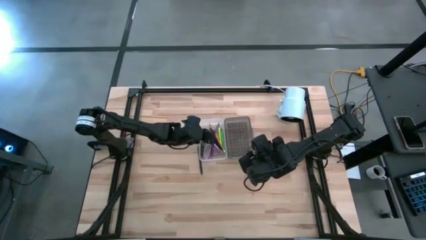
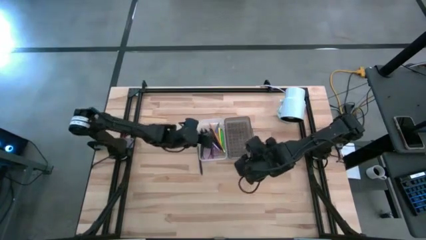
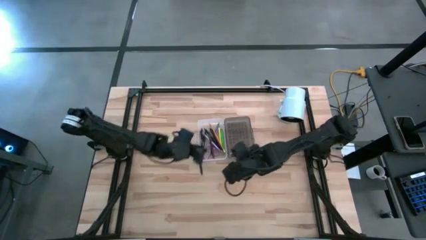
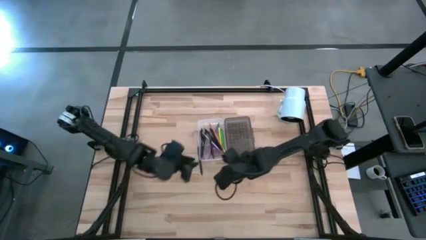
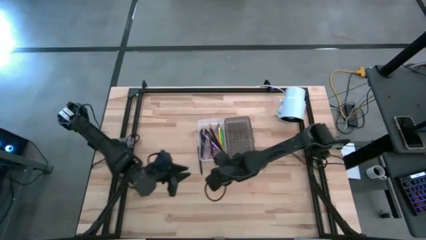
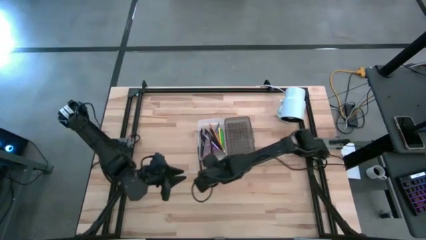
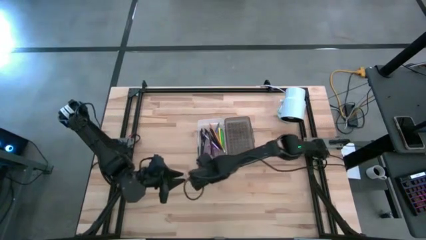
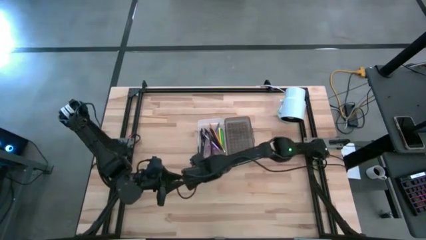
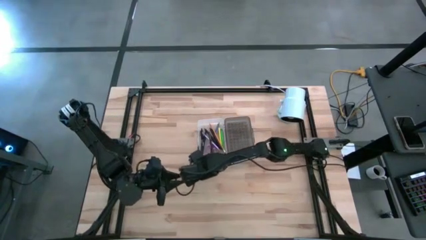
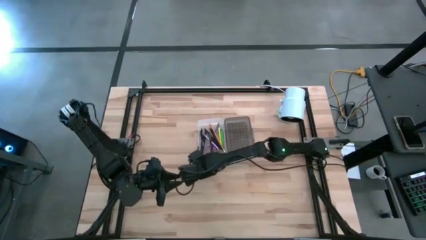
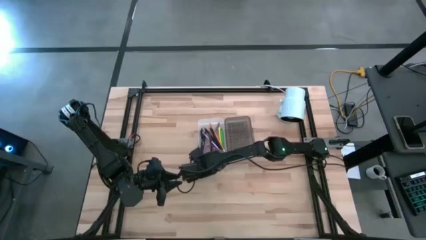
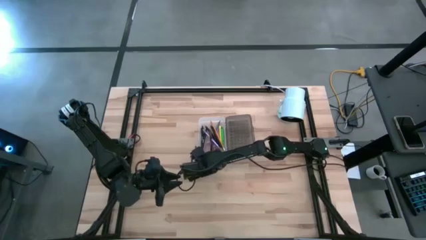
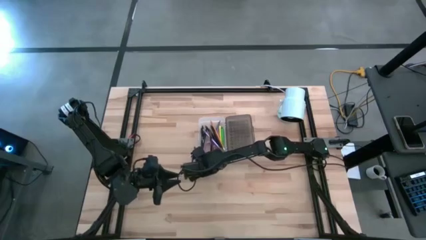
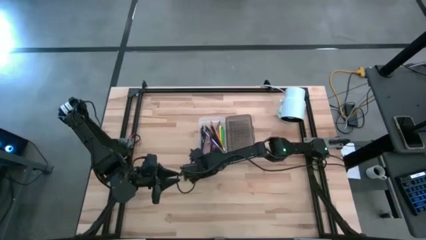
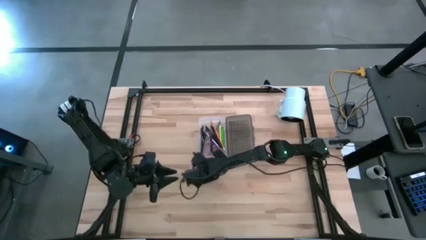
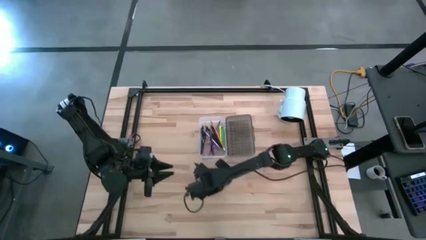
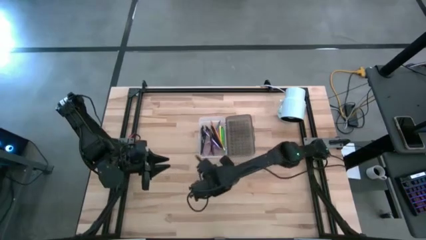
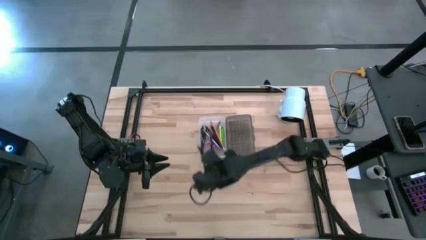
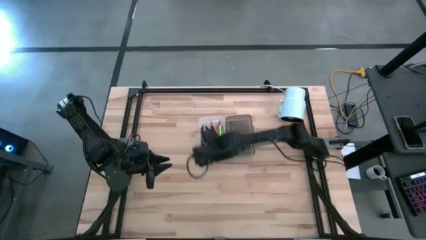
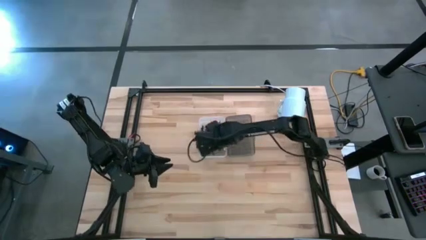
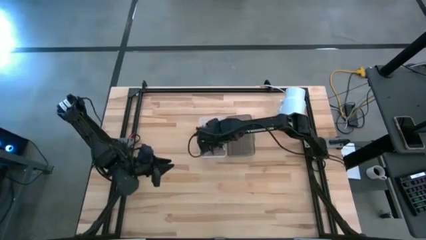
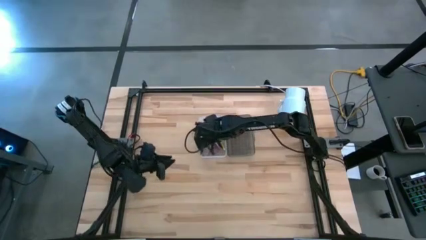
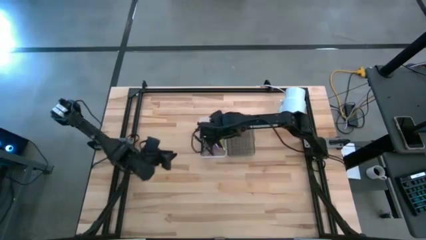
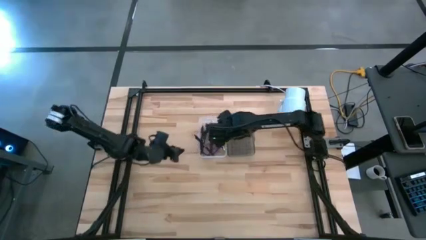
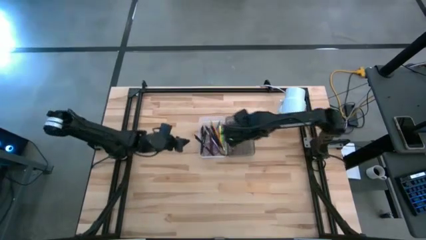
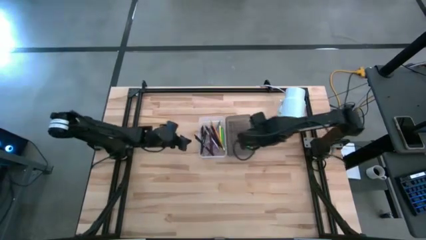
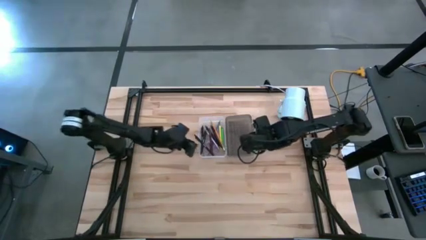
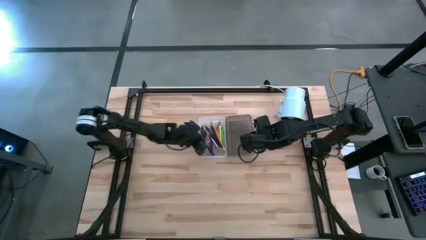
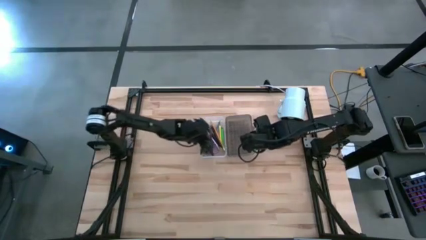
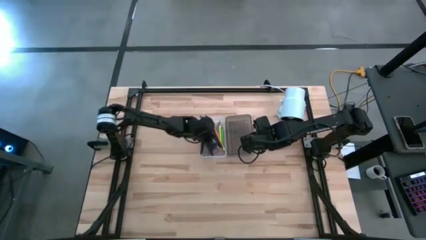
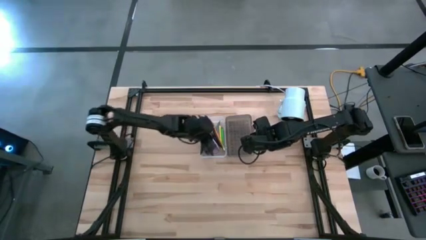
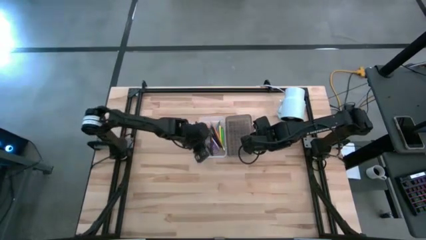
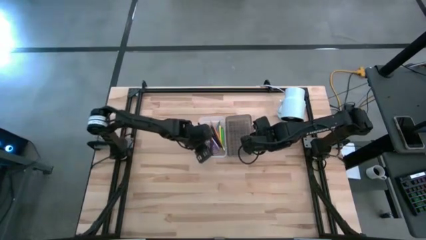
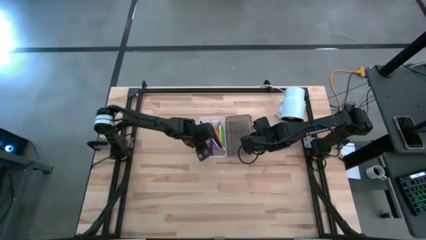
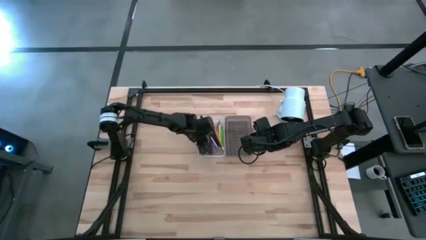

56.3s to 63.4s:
Task: Pick & place school supplies into a supply box
Put the black pen into the supply box

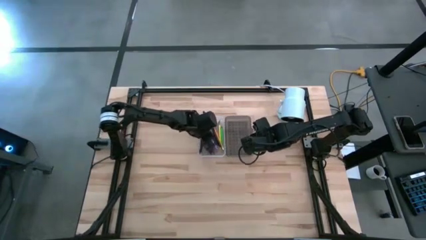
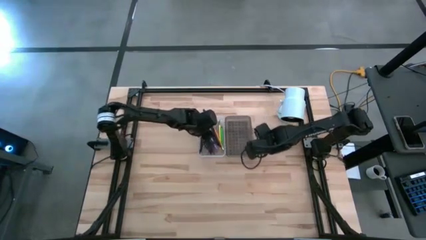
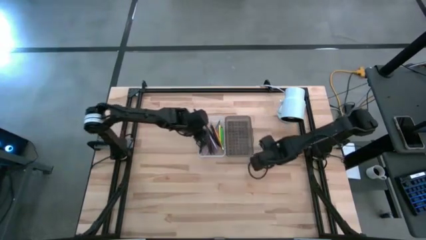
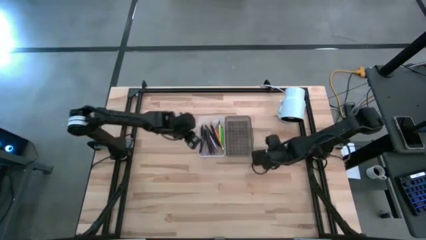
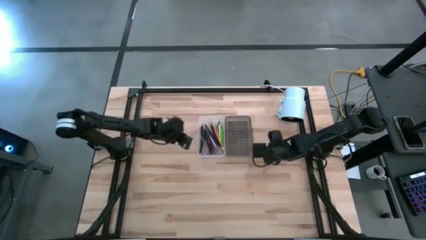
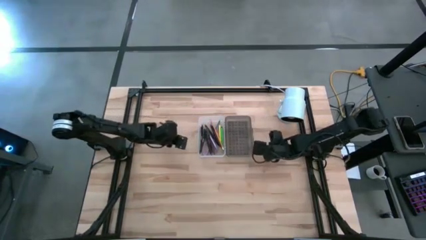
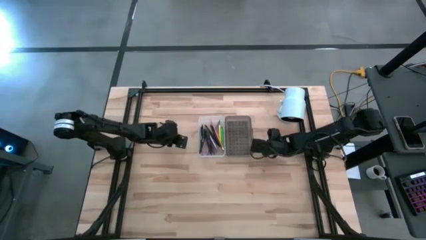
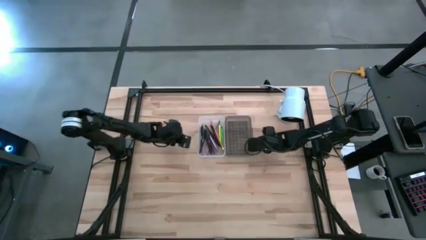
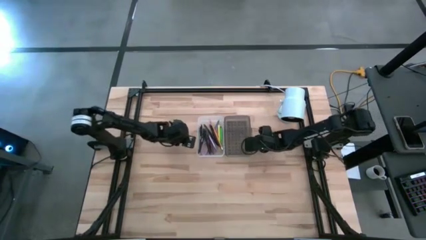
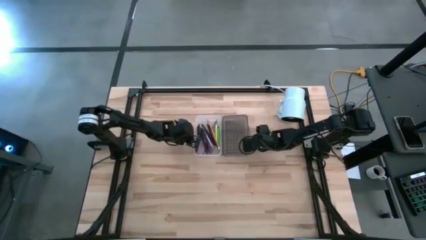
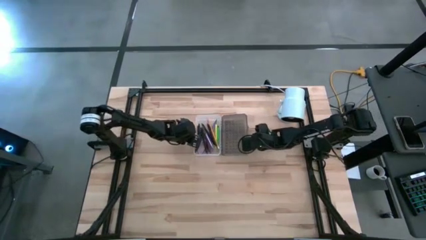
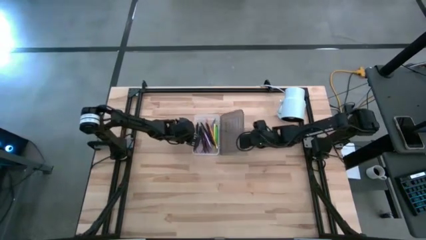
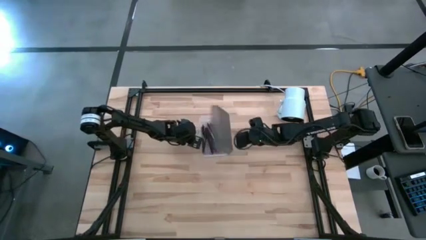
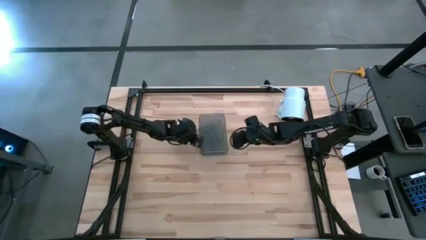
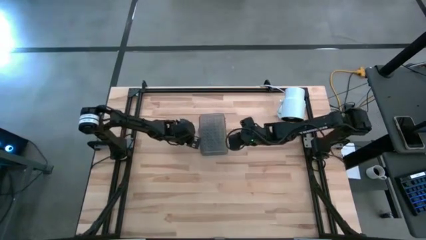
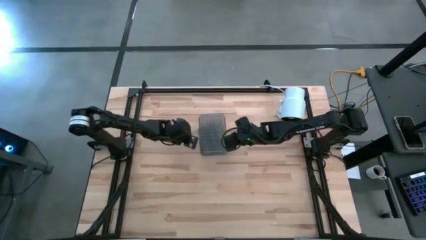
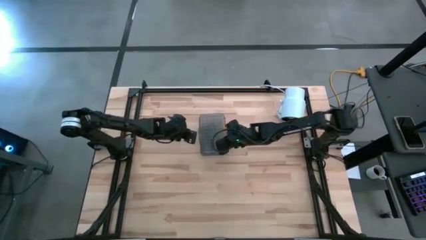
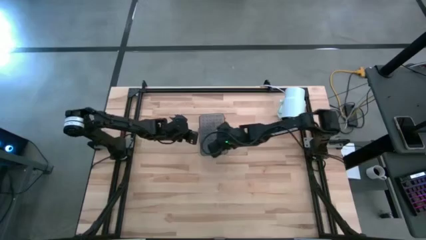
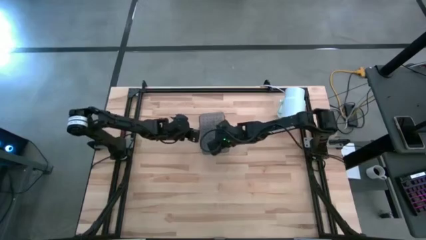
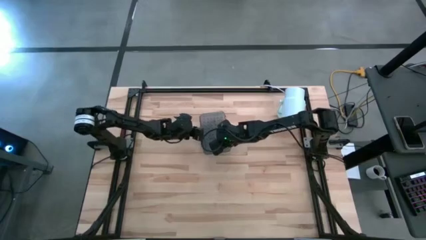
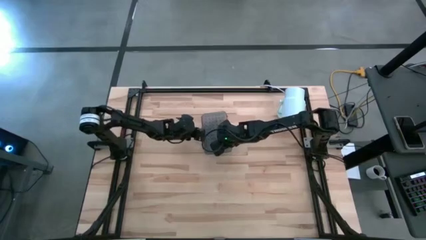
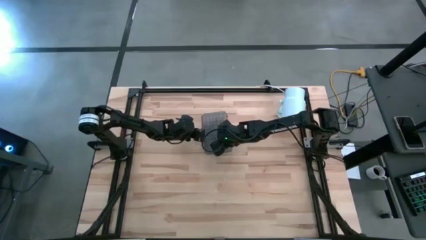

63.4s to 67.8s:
Close the supply box

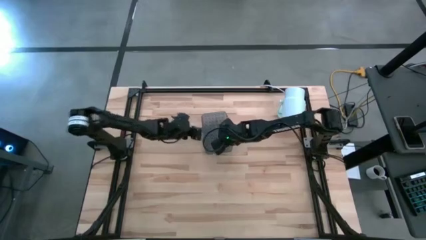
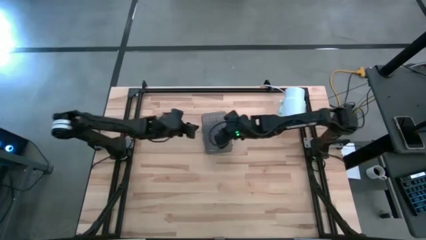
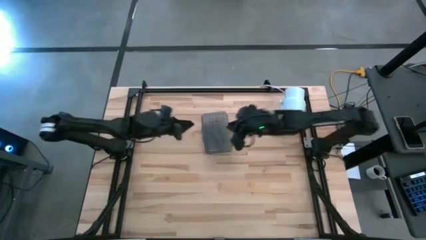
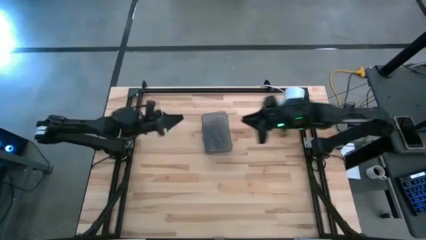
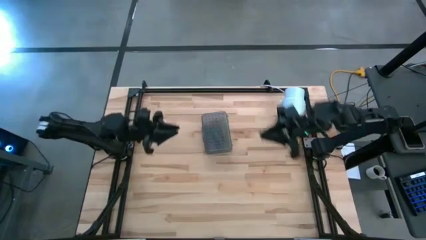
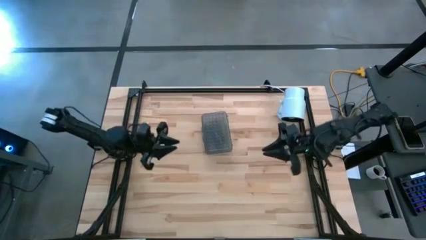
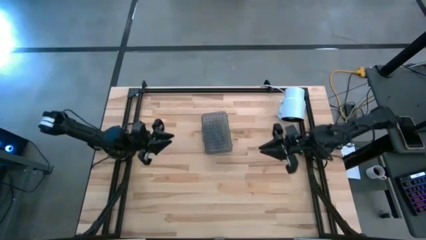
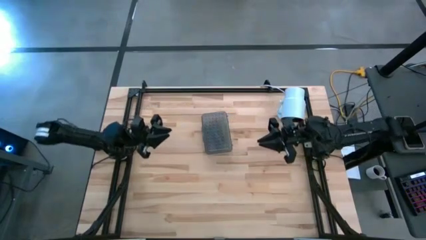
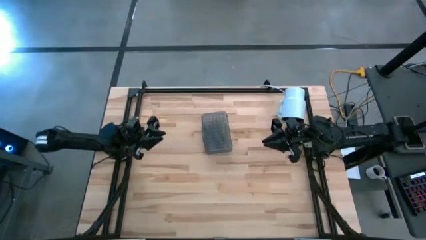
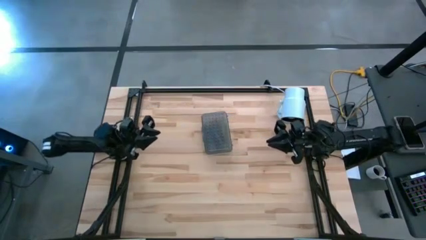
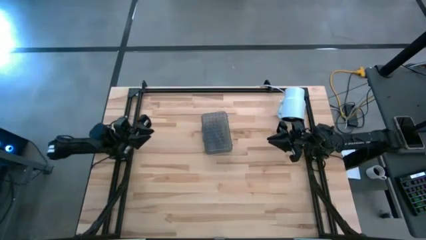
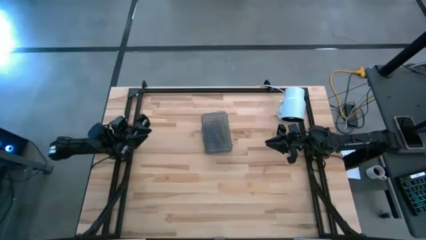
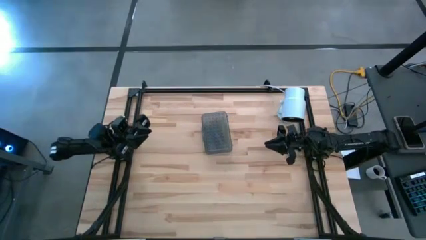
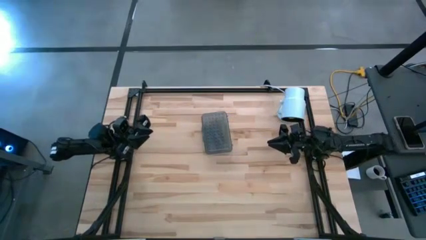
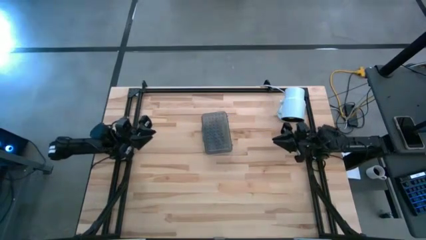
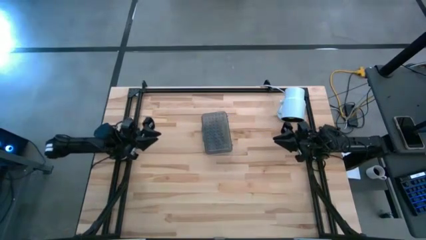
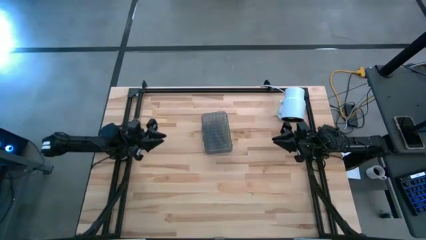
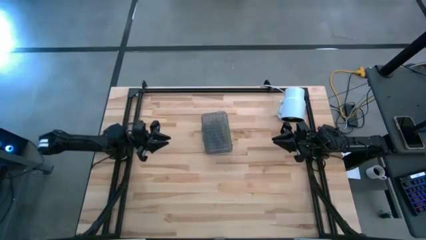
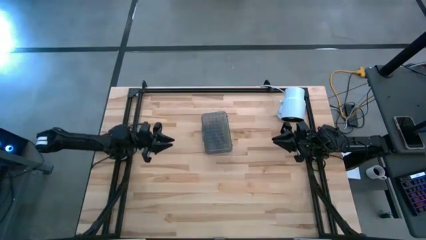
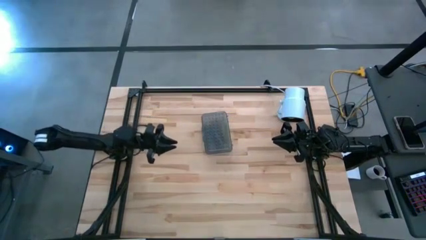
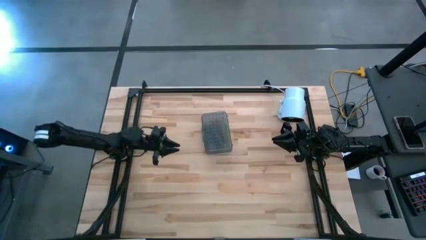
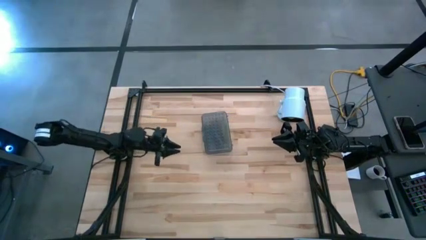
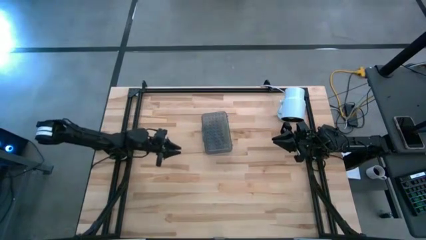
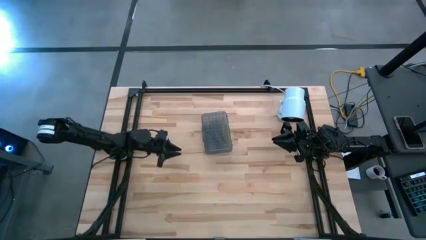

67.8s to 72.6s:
Return to Home Position

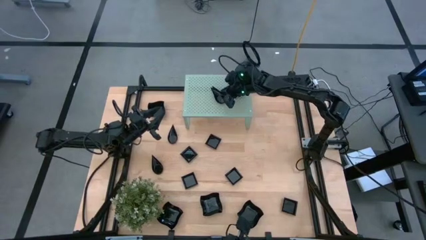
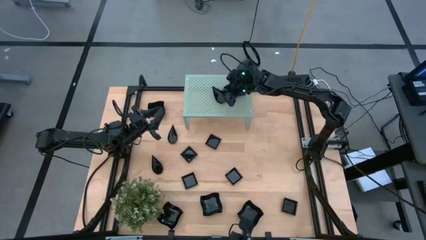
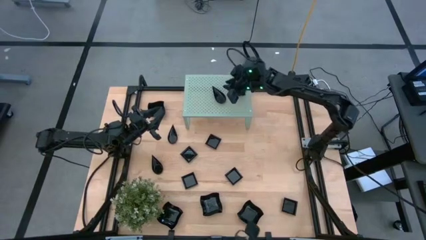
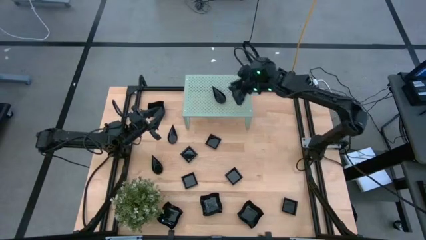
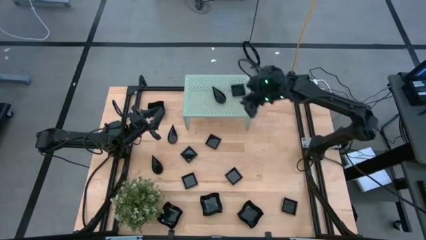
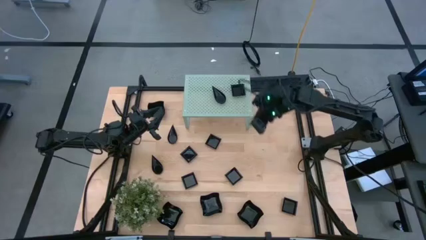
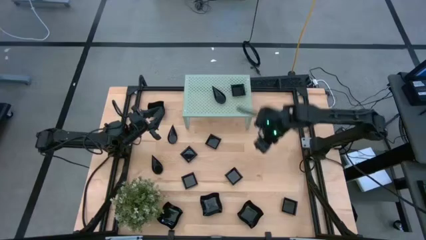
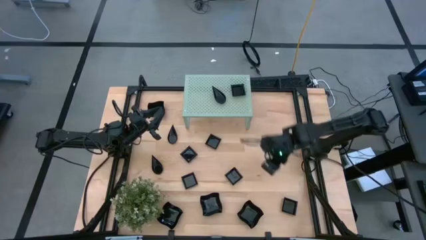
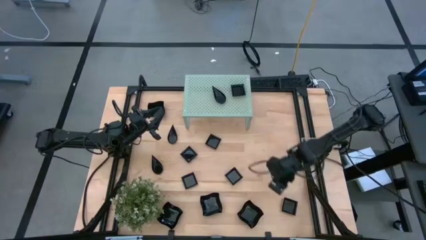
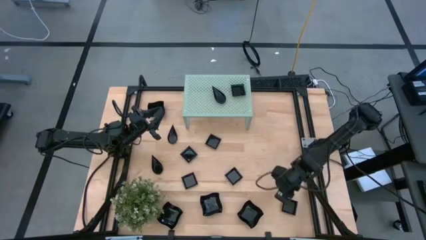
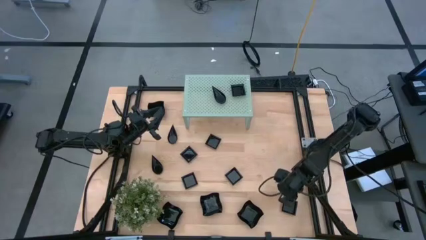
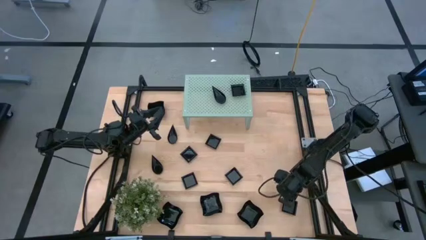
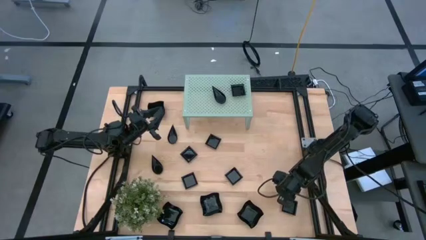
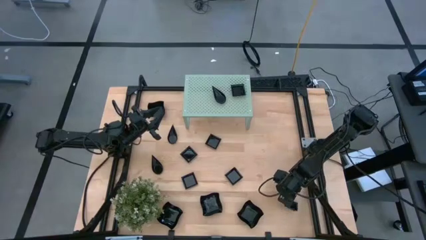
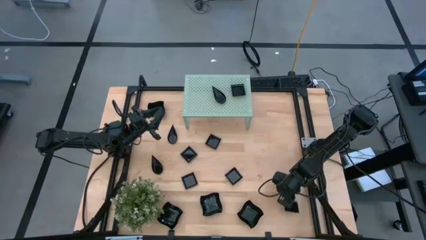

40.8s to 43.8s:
Task: Pick & Place Mini shaped plates
Stack the black square plate on the shelf
